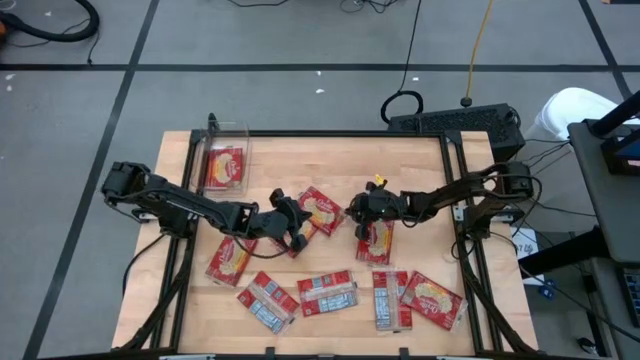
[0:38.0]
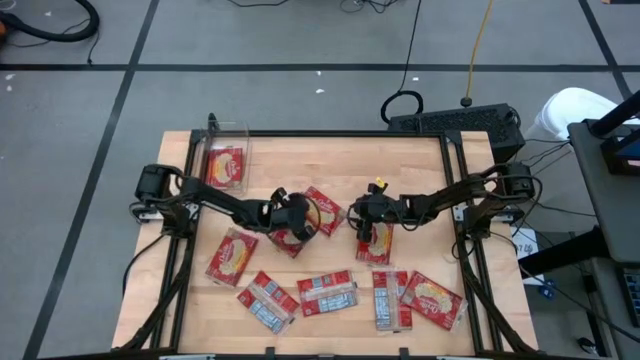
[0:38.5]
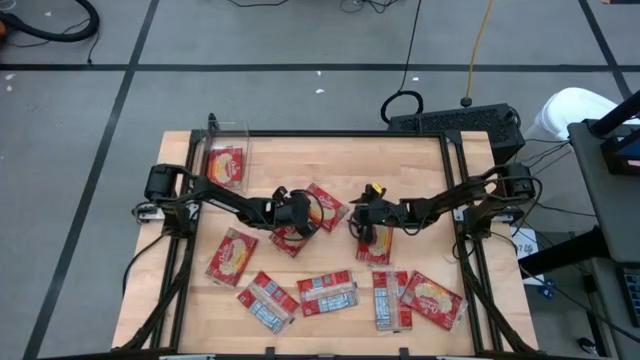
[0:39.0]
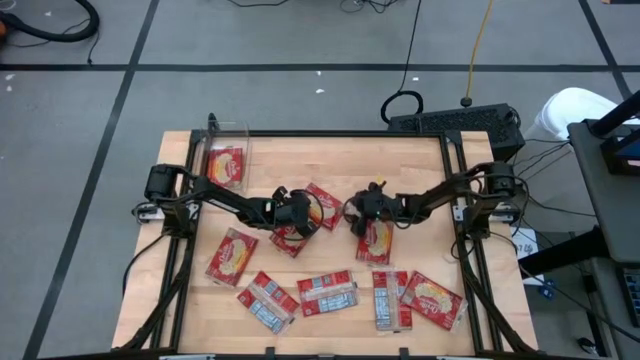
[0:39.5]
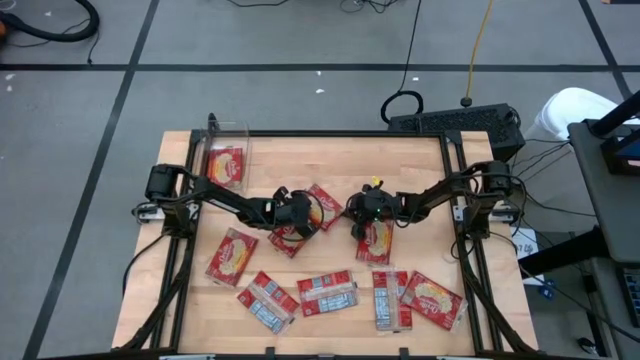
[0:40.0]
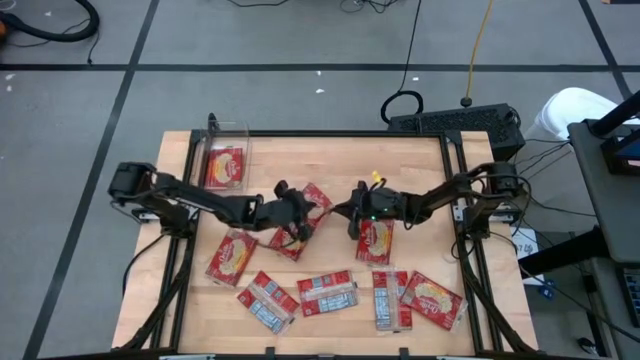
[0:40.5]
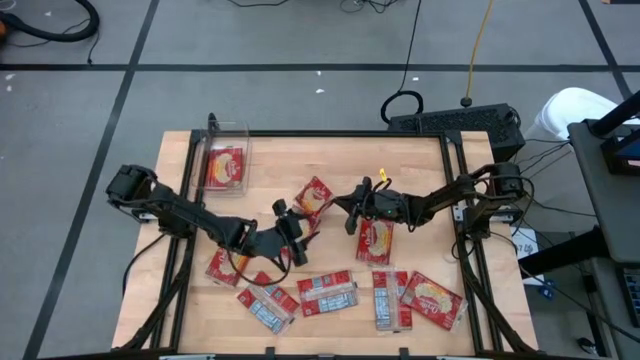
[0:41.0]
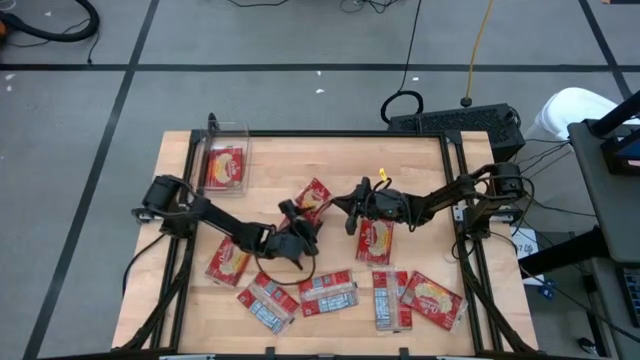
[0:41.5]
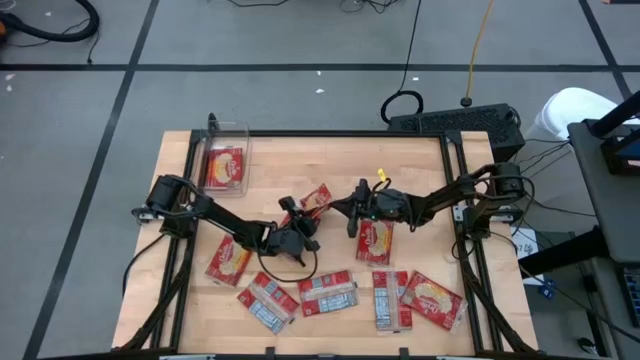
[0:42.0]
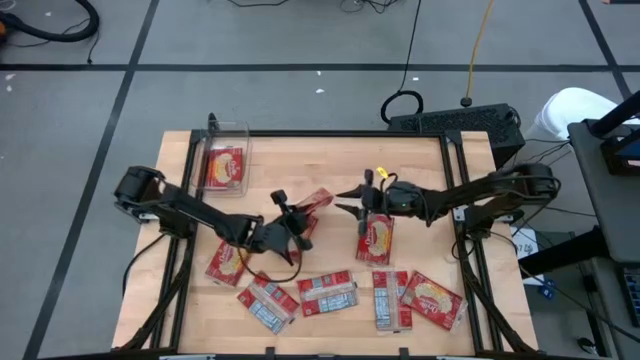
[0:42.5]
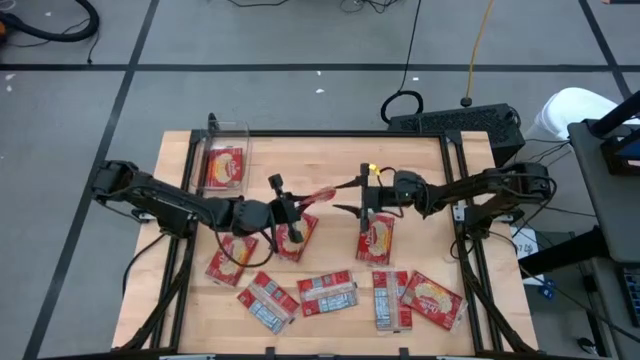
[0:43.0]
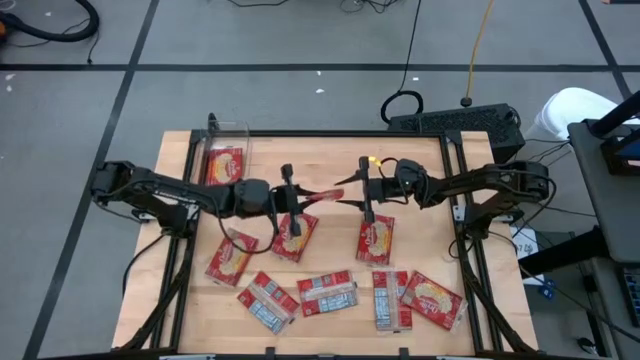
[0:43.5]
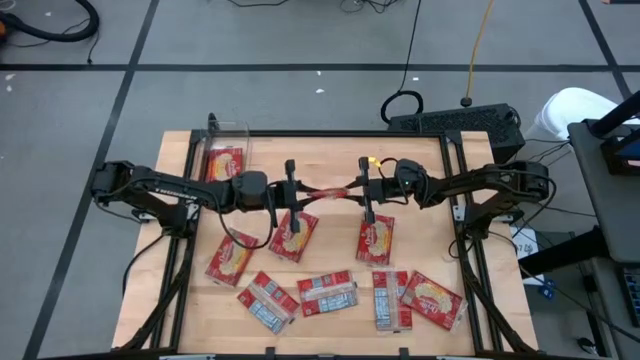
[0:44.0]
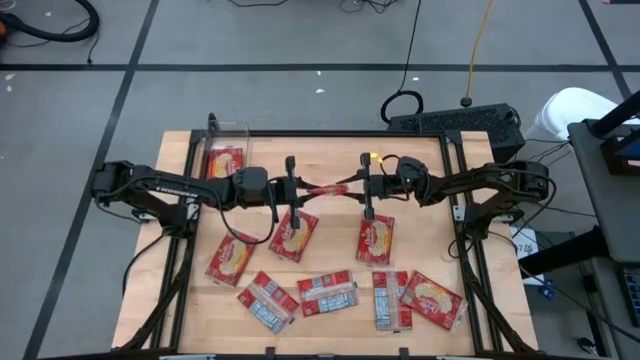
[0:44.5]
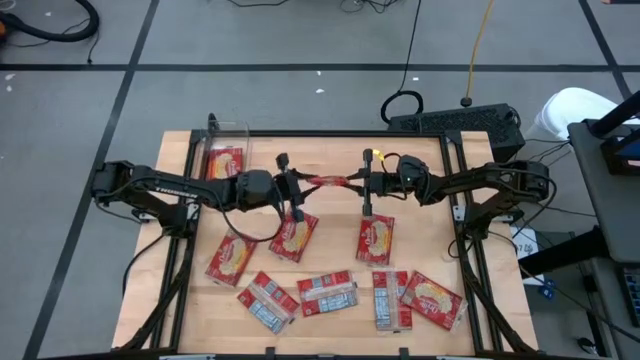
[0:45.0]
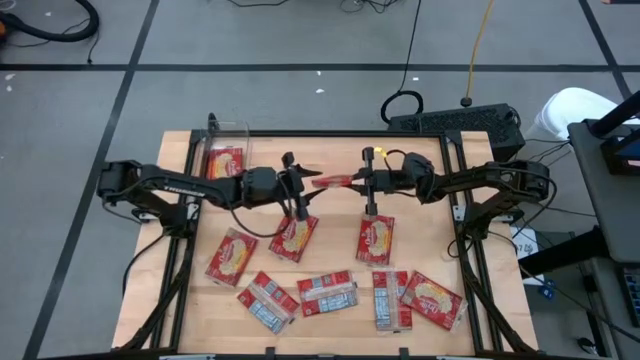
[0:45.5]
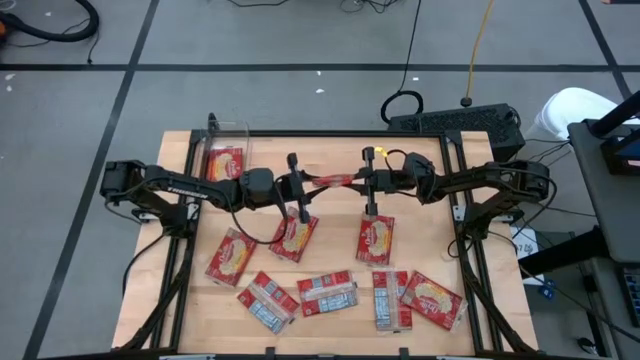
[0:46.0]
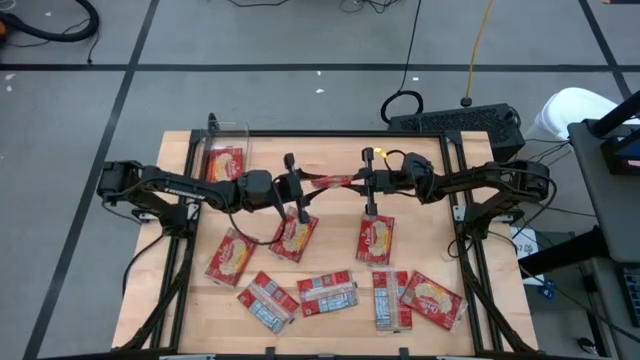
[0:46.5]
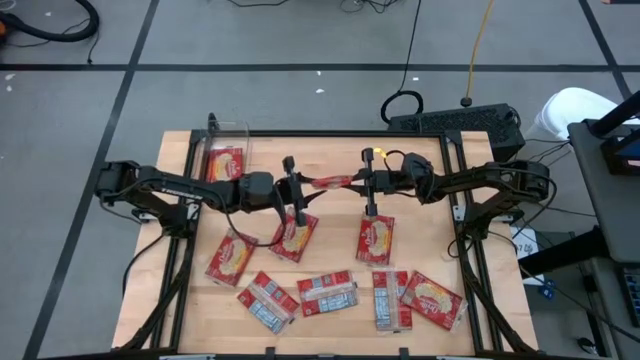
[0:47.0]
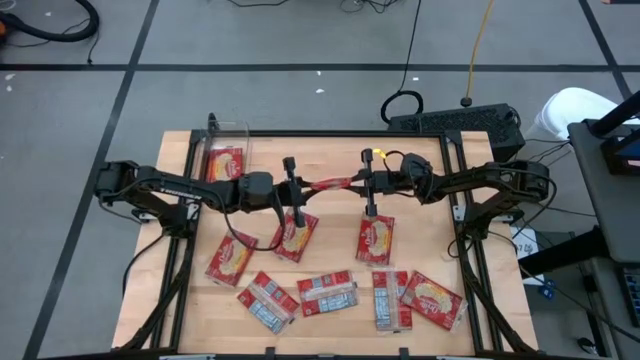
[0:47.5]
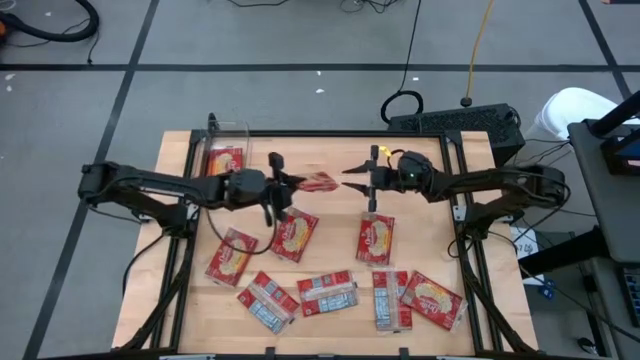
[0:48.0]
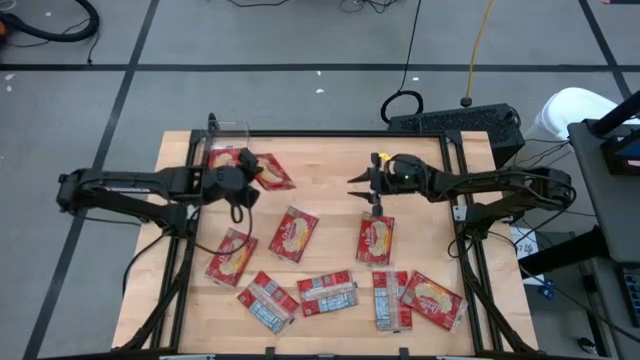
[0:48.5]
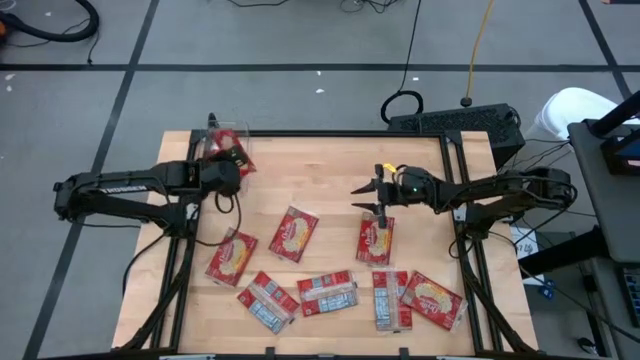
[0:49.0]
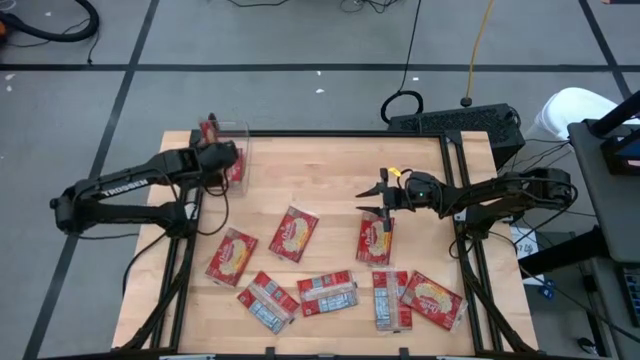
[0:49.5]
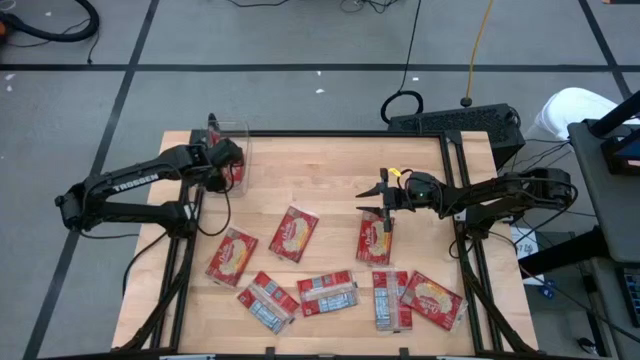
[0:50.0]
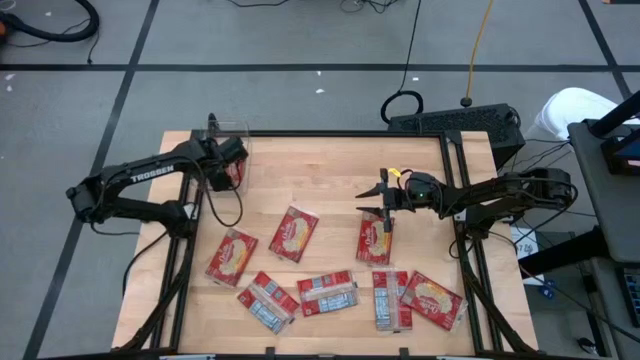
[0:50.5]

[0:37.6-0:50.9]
Task: Sort popcorn bags into baskets
Put the red popcorn bag into the transparent bin

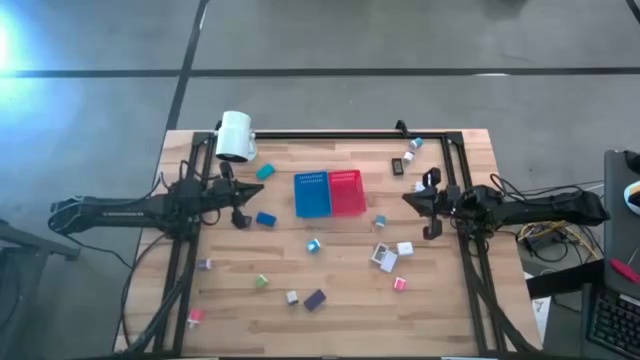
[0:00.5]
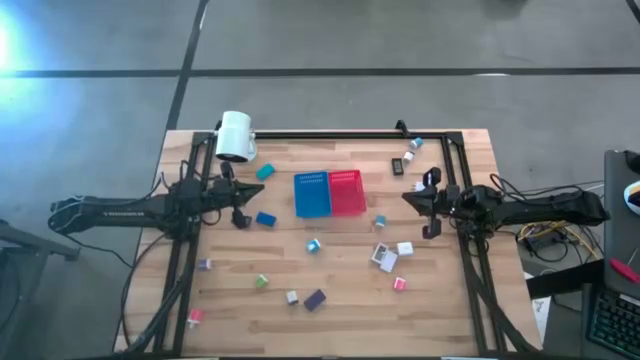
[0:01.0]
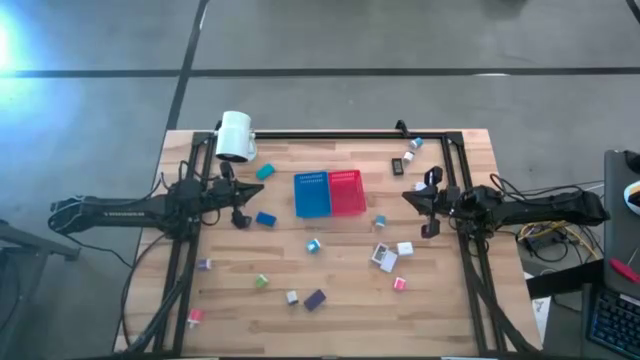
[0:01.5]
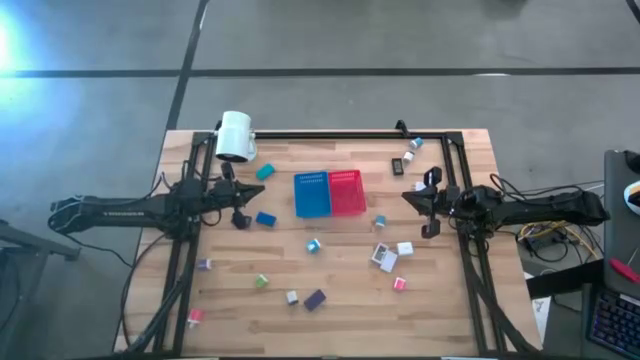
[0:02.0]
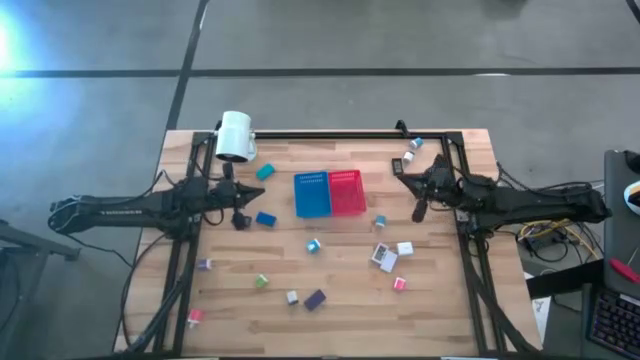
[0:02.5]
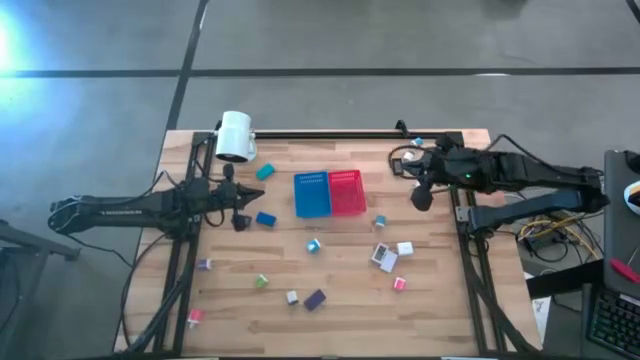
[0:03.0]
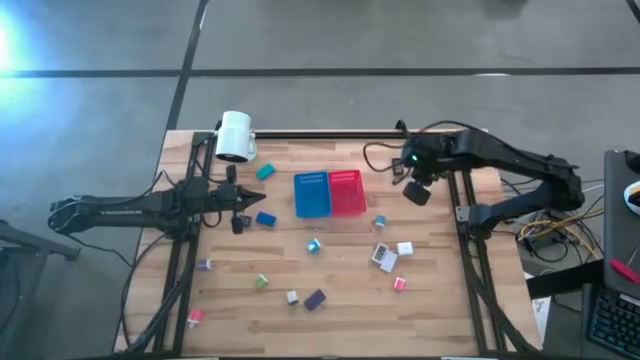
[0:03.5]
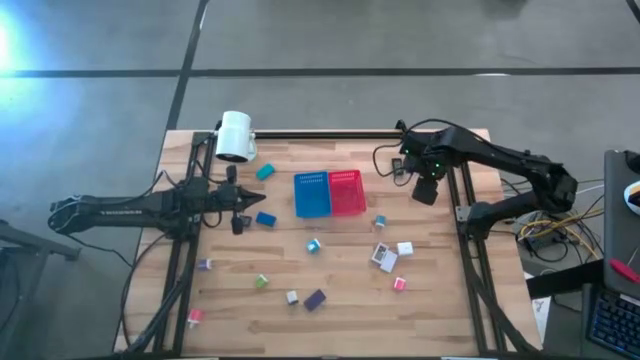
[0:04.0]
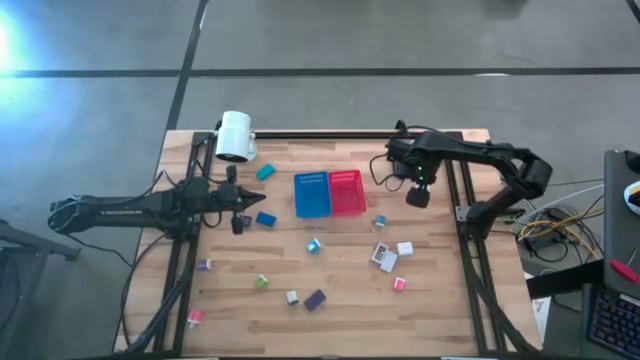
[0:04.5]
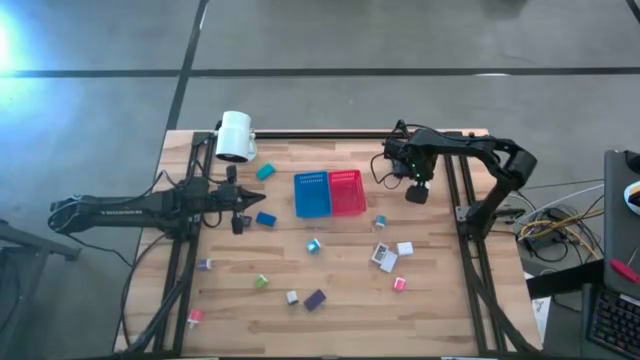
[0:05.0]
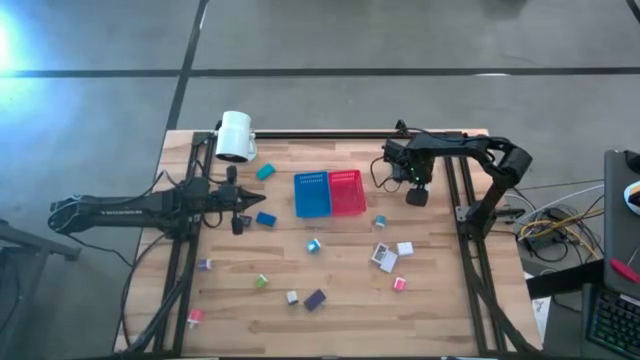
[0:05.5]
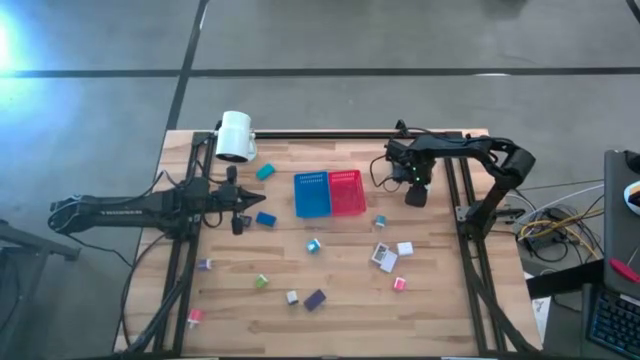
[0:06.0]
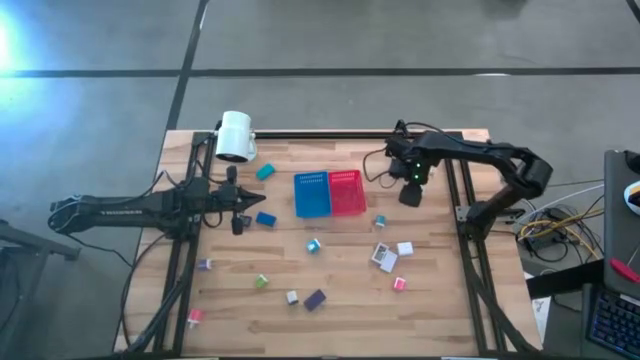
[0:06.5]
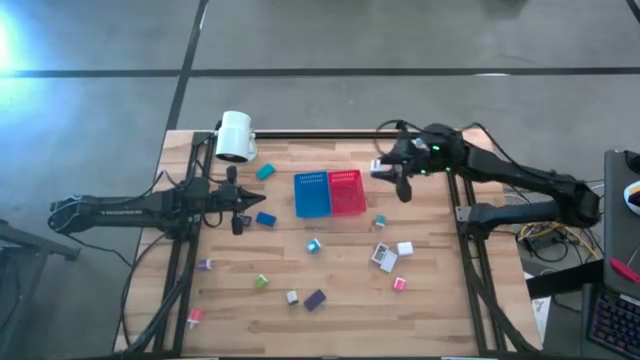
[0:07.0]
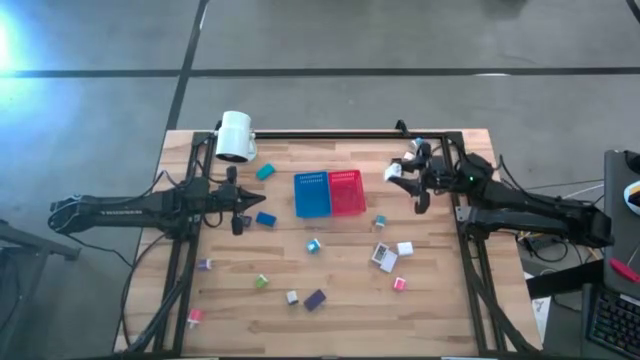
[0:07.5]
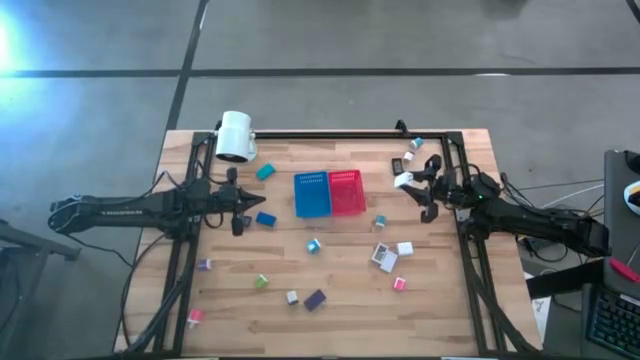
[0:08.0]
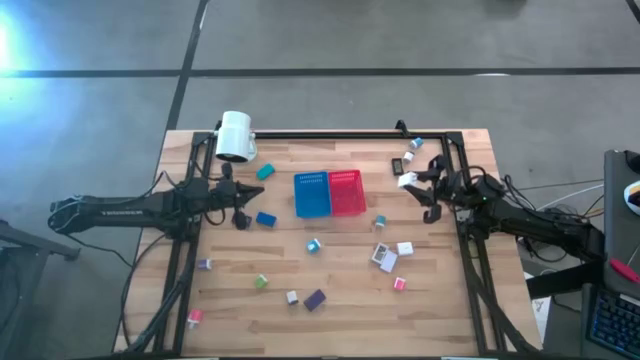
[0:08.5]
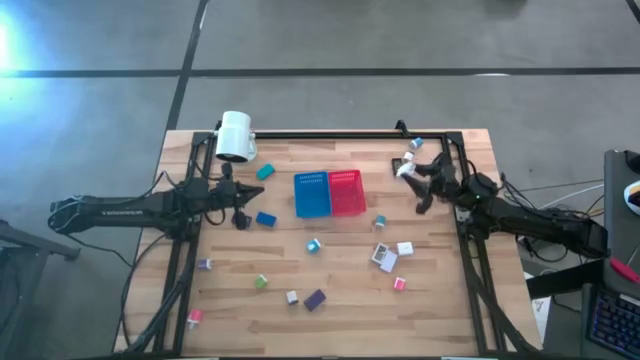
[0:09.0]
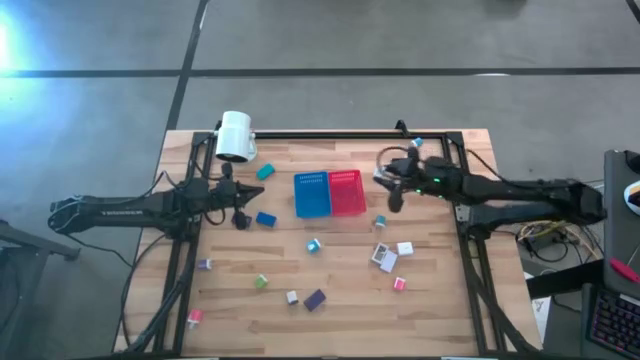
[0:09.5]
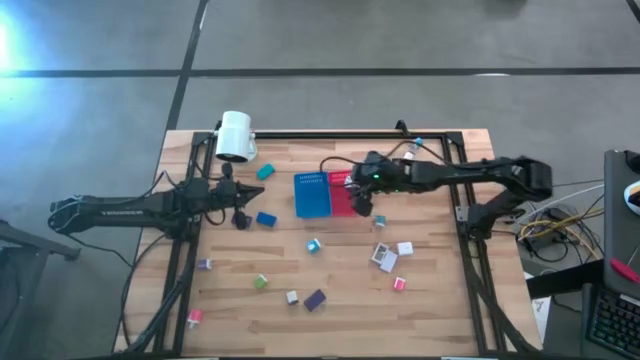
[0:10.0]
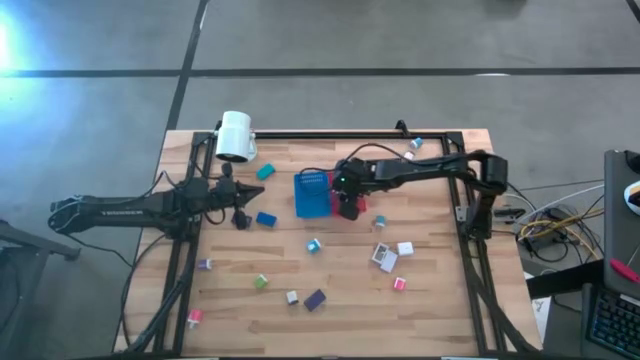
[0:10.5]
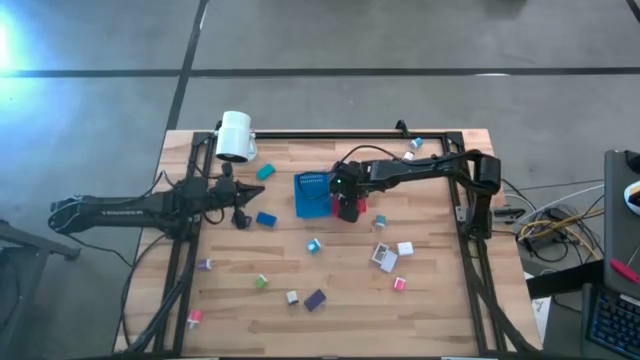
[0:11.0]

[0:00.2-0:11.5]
Task: Pick & Place Office items
Put the top white charger adapter into the red bin
